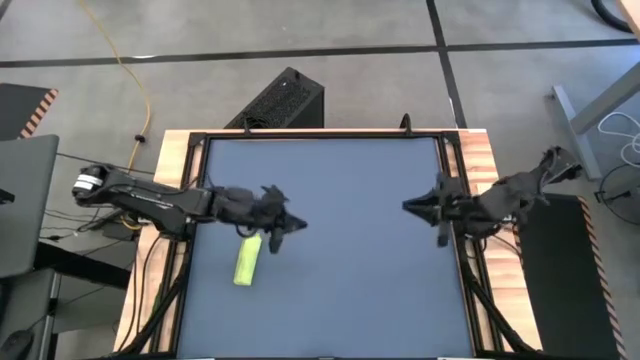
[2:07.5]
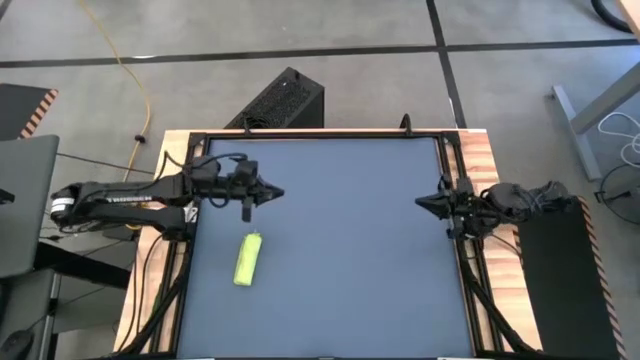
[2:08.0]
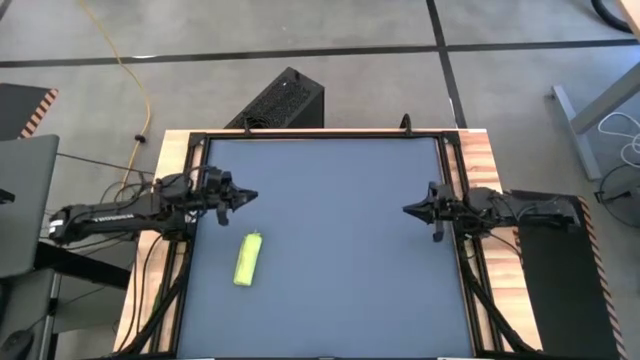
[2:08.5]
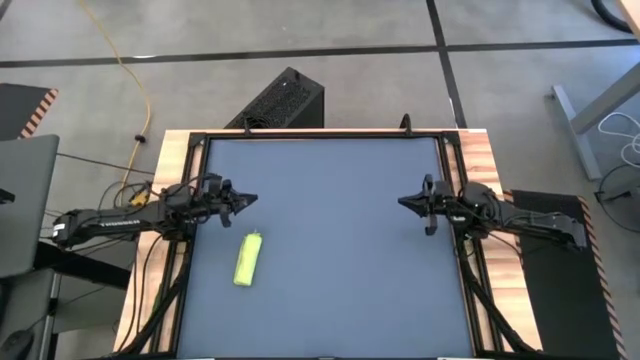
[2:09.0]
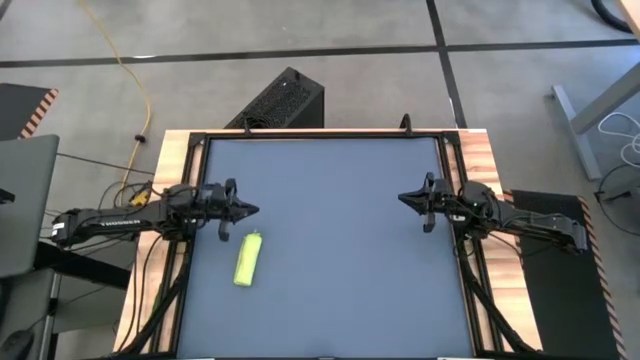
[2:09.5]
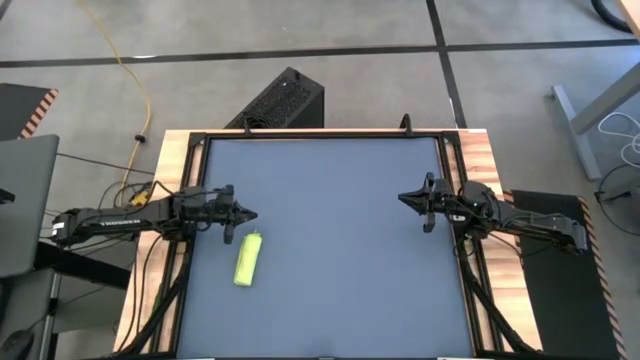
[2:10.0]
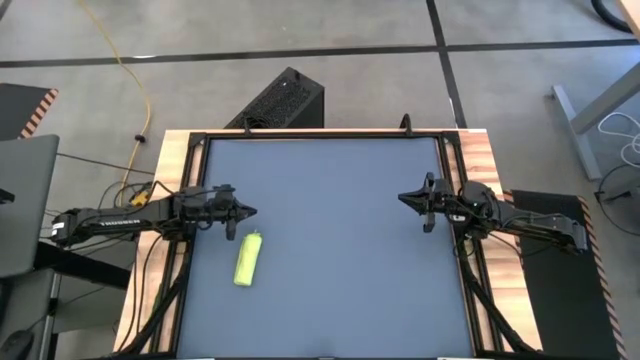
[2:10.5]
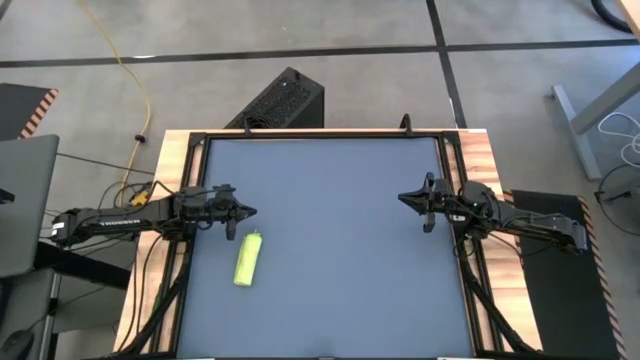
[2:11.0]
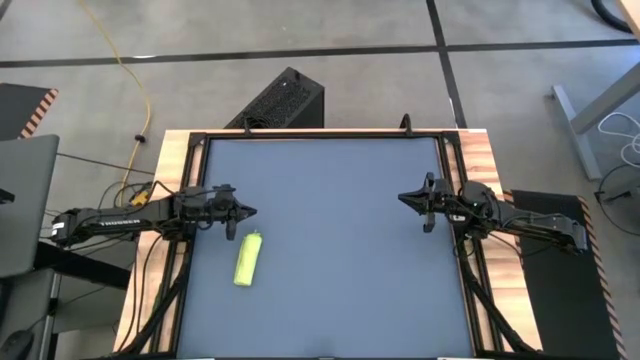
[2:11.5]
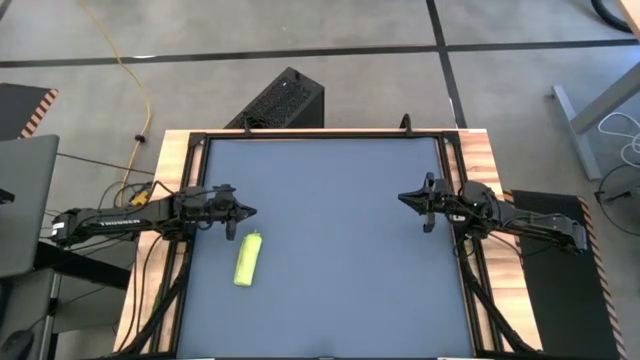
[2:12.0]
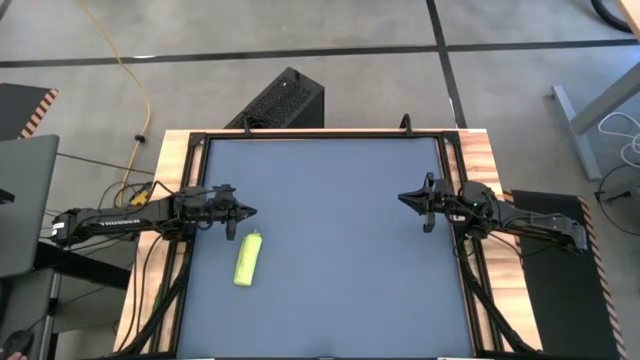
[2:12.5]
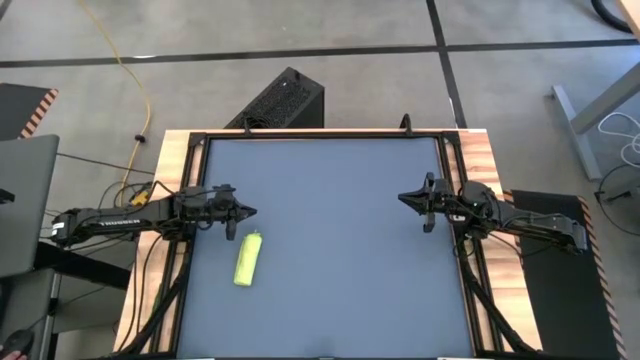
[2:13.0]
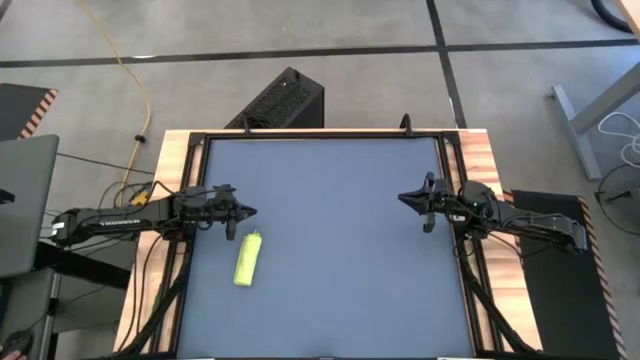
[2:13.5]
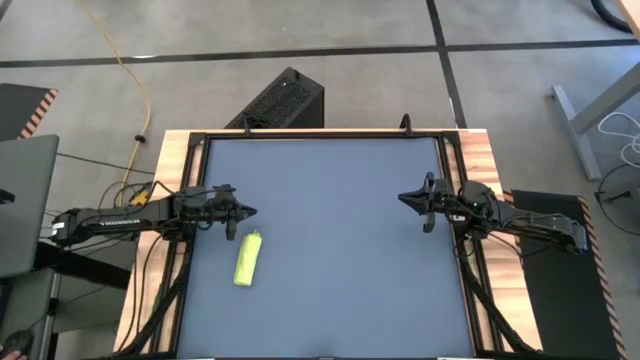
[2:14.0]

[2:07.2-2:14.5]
Task: Roll towel into tight, uniform cylinder
Return to Home Position

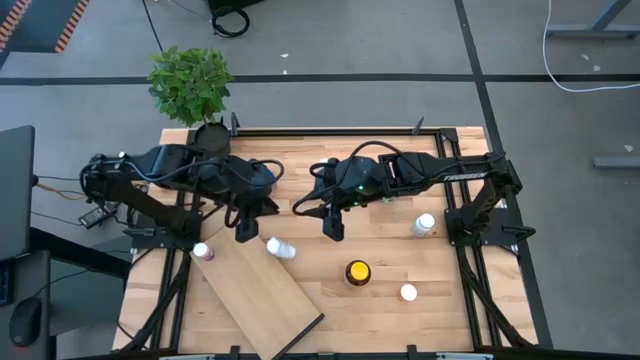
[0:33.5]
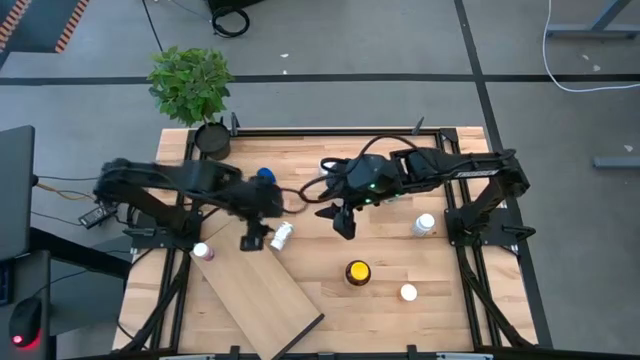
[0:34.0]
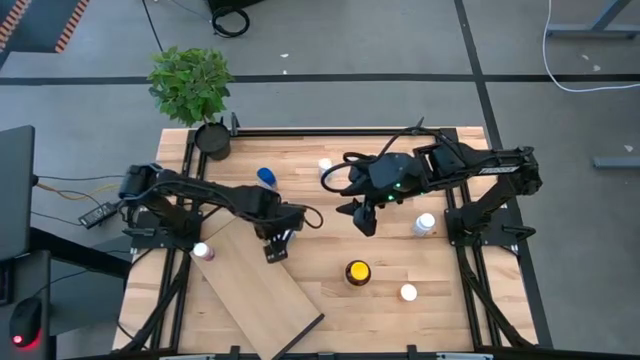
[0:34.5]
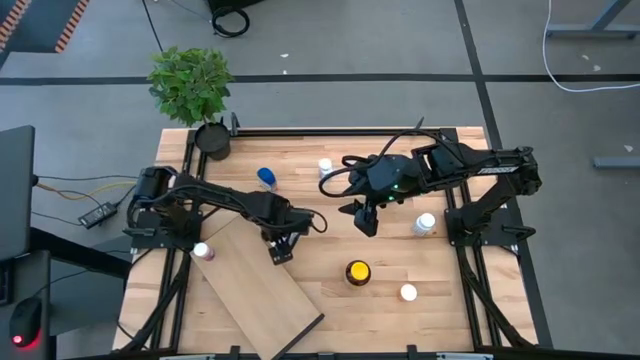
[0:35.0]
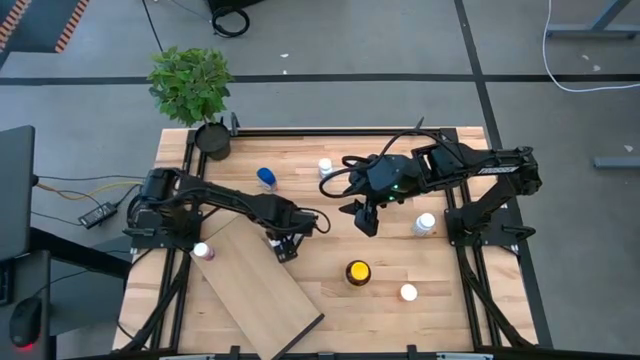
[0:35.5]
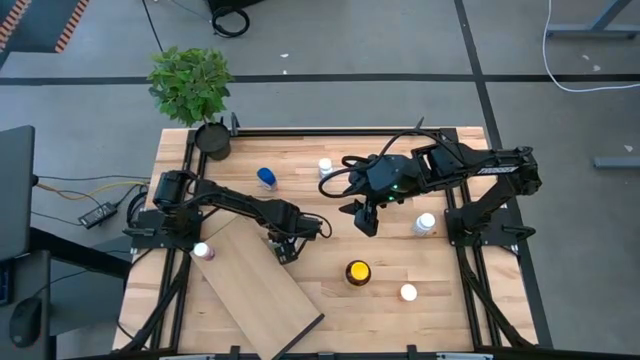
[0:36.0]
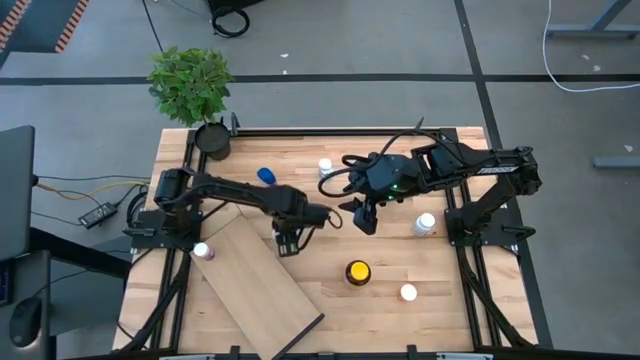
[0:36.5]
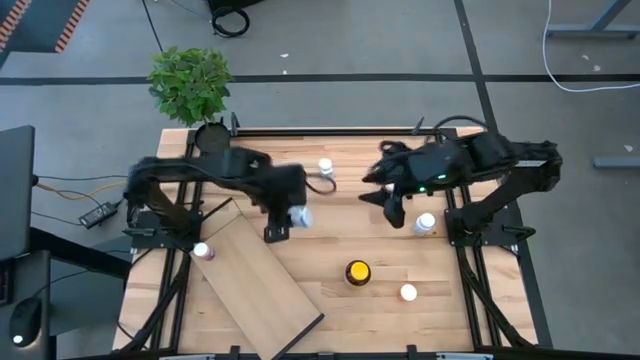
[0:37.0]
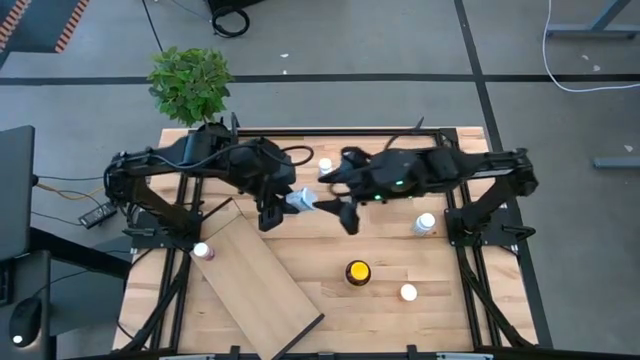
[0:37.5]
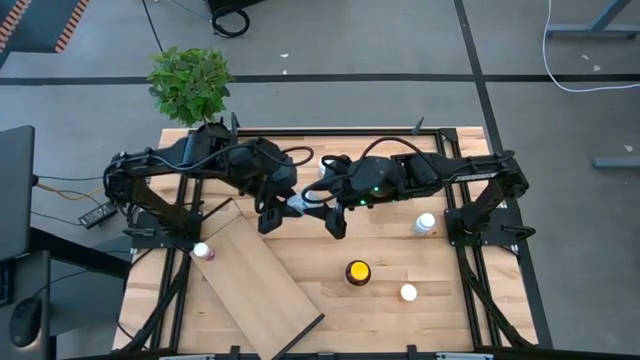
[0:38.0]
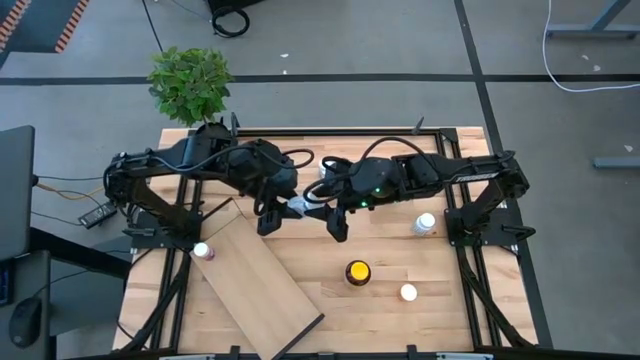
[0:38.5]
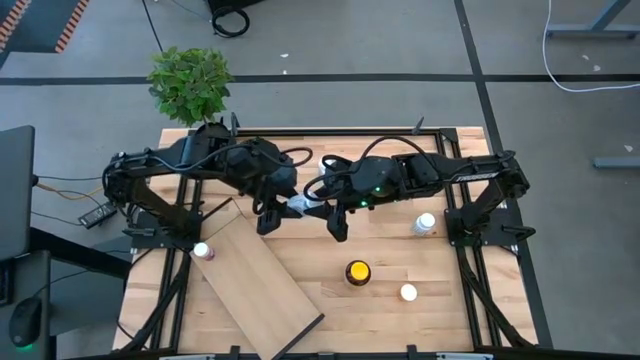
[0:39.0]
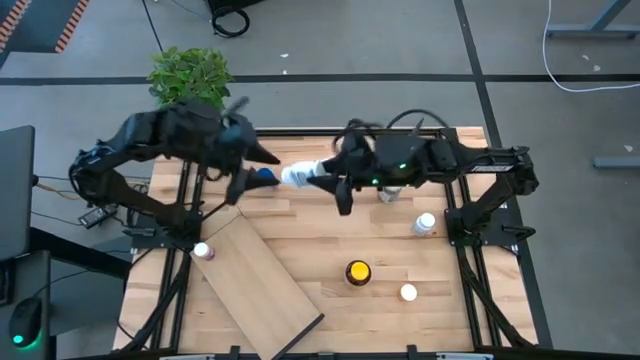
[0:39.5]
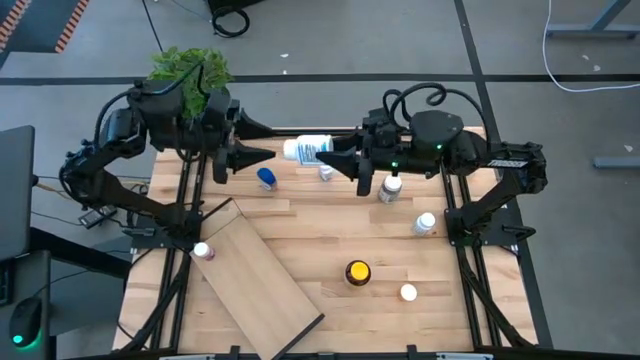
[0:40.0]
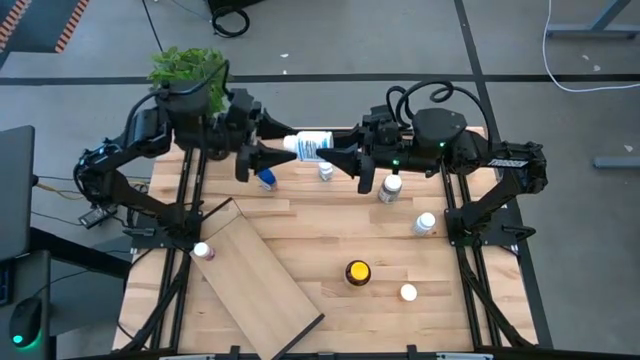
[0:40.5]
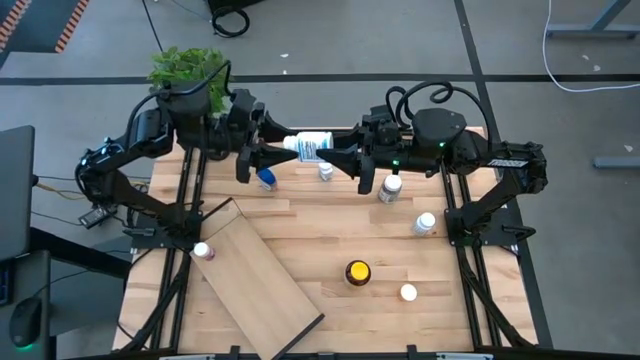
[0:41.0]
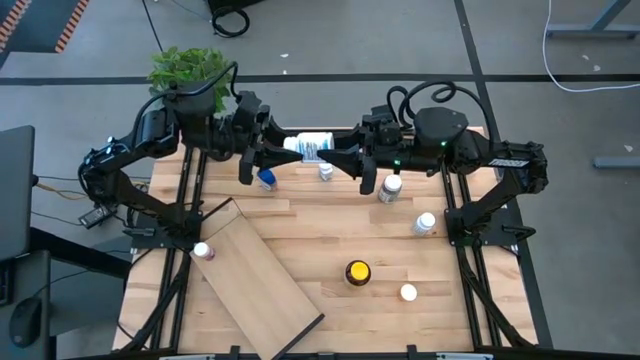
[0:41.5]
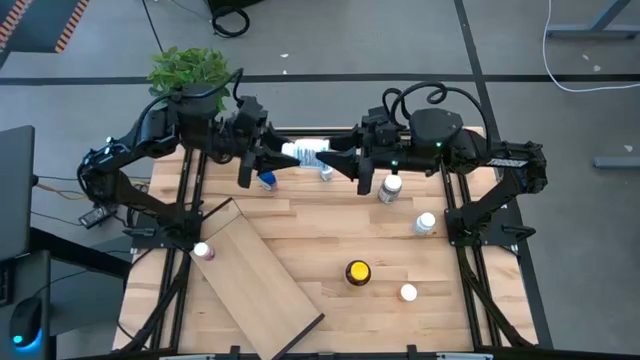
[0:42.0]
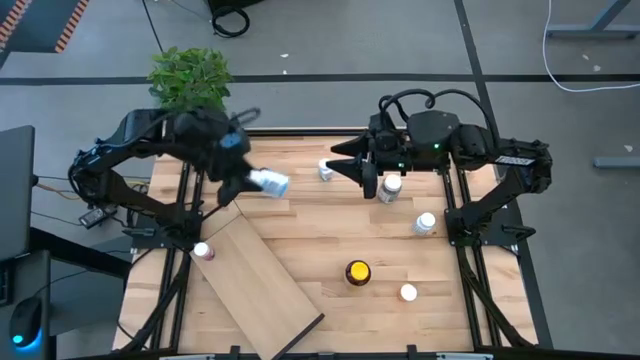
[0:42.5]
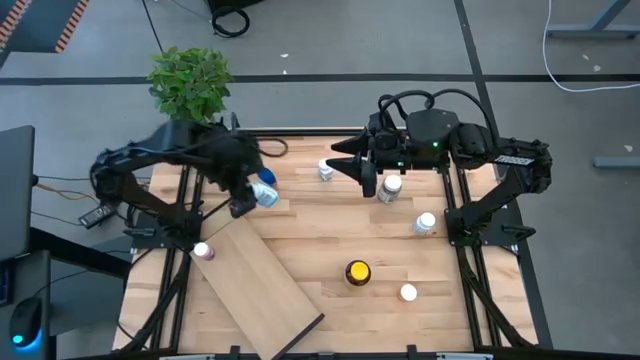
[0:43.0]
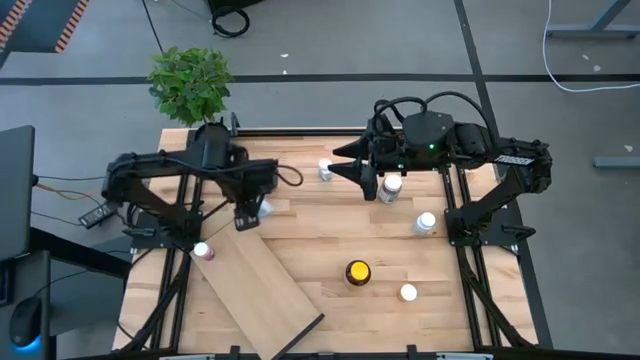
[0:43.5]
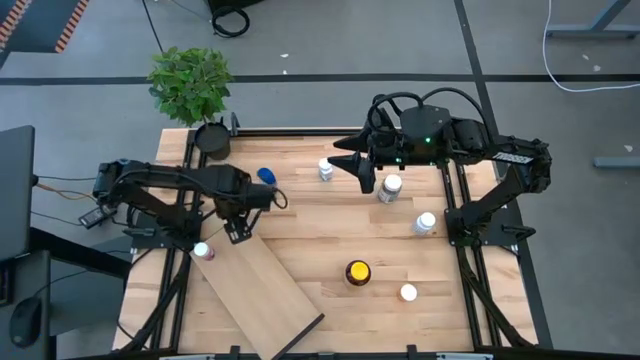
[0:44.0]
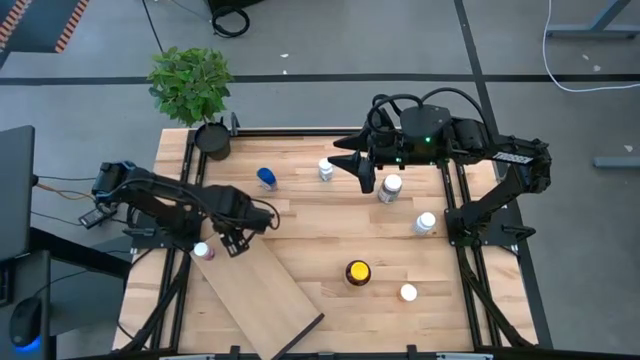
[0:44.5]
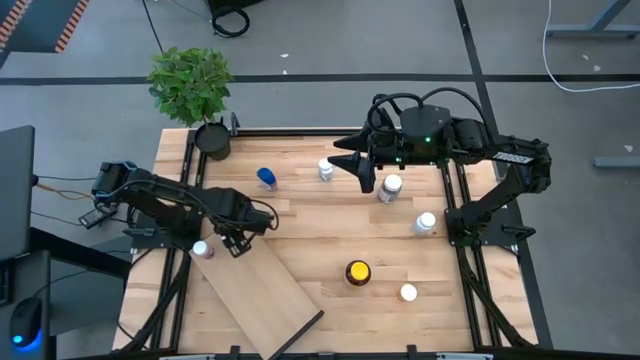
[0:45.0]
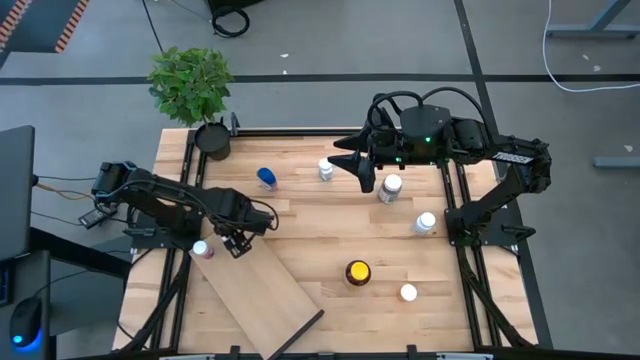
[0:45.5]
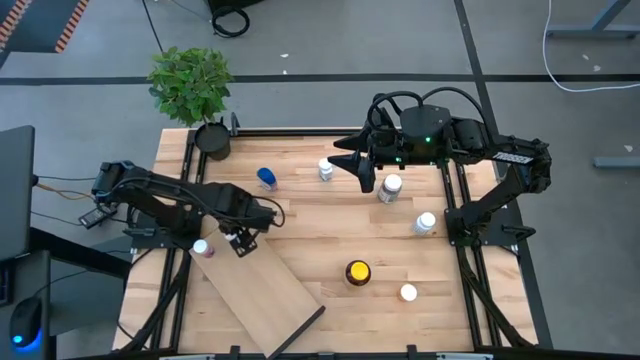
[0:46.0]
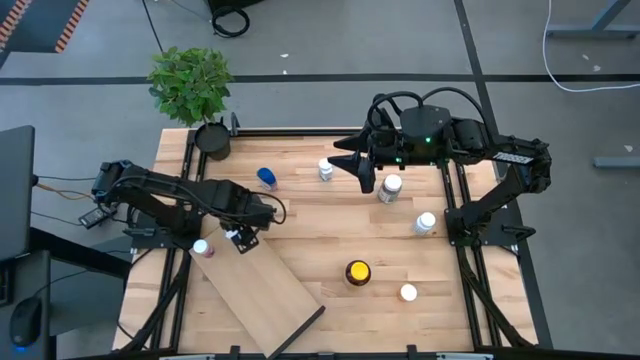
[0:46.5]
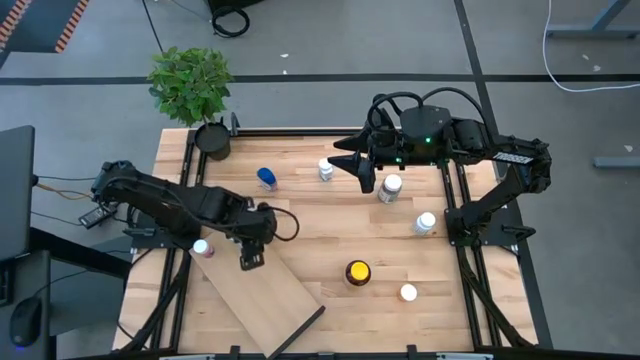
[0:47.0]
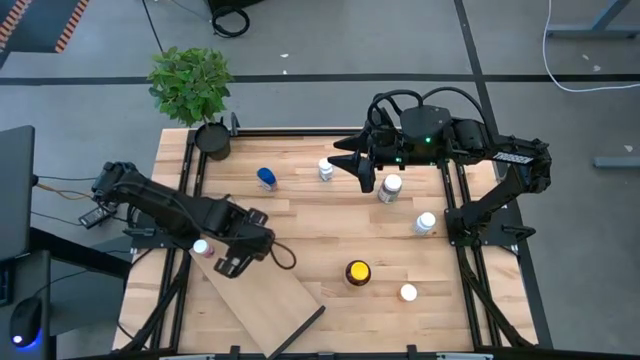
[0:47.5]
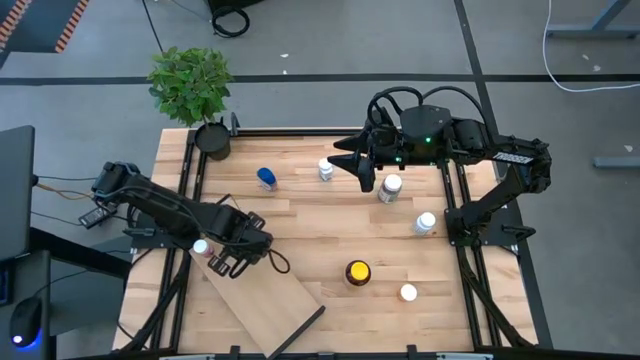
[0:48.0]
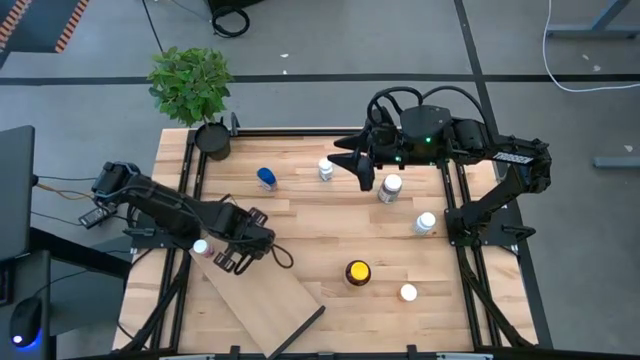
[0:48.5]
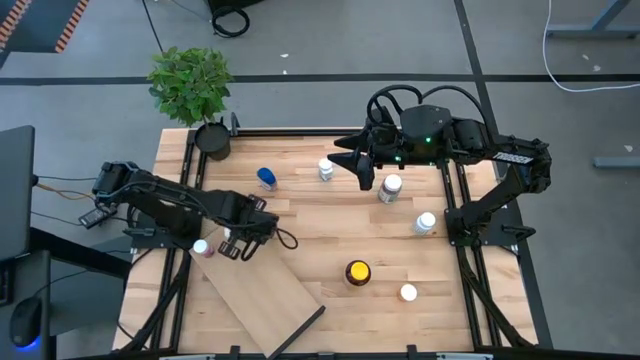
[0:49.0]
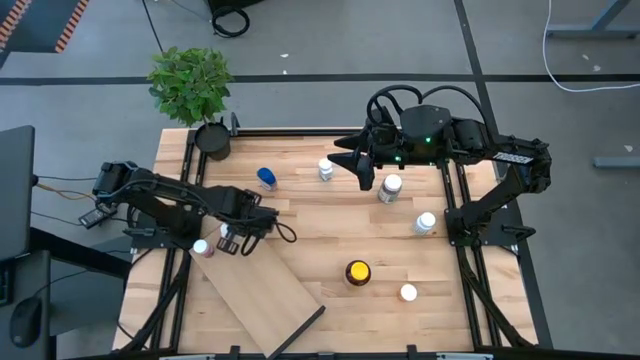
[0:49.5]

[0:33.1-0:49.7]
Task: Pick and place medicine bottles onto shelf by color
Put the left white pill bottle on the shelf
